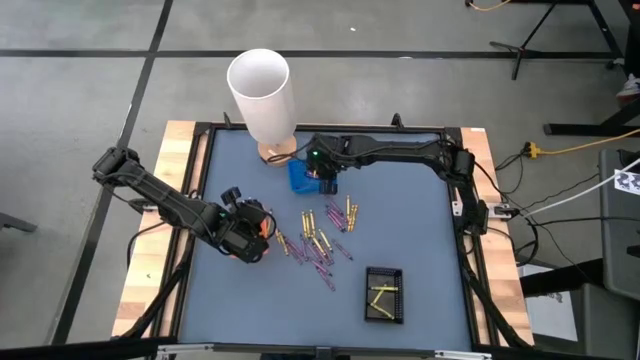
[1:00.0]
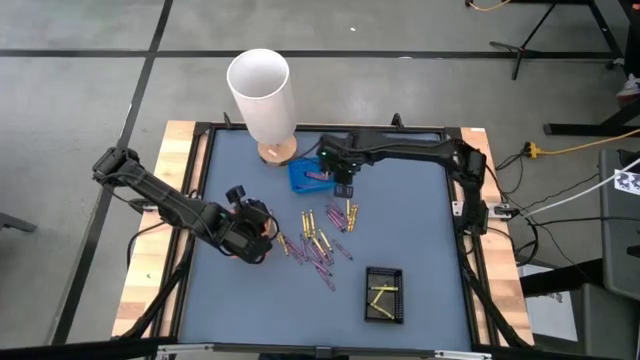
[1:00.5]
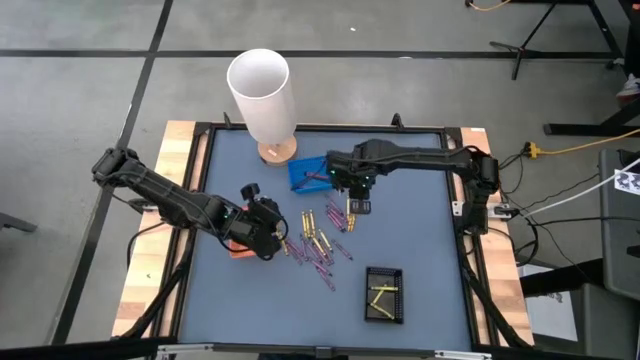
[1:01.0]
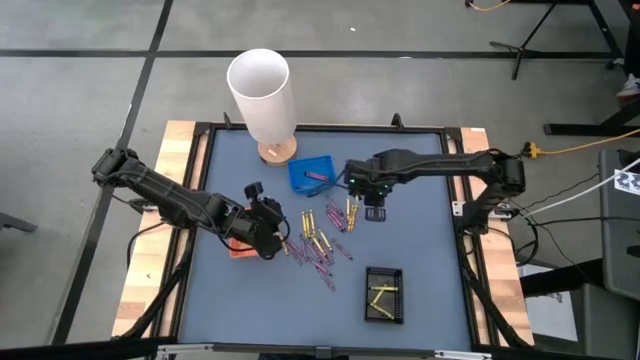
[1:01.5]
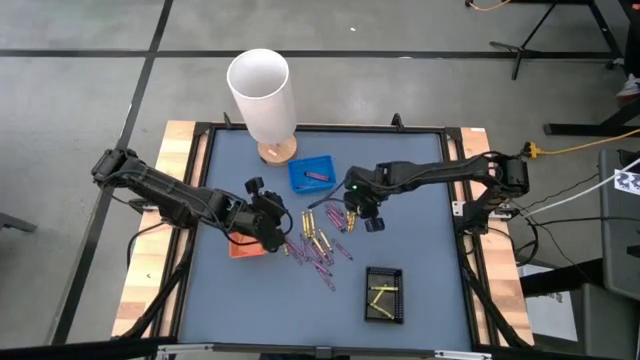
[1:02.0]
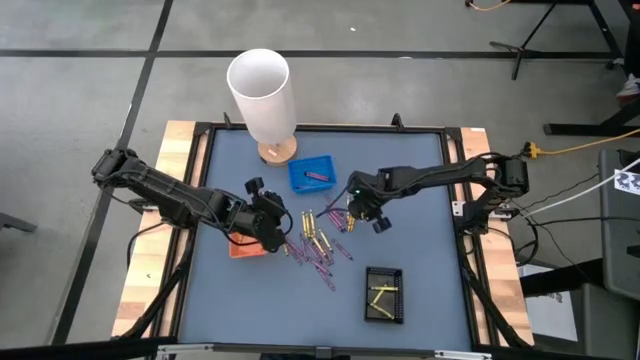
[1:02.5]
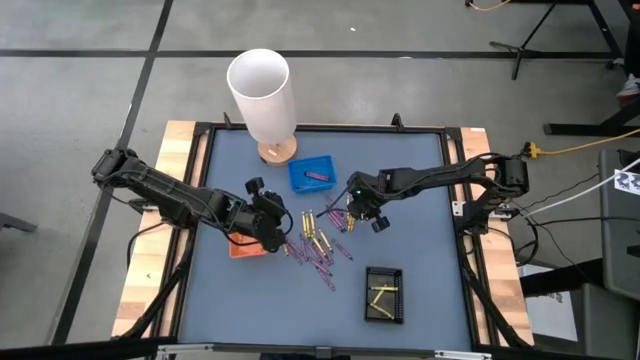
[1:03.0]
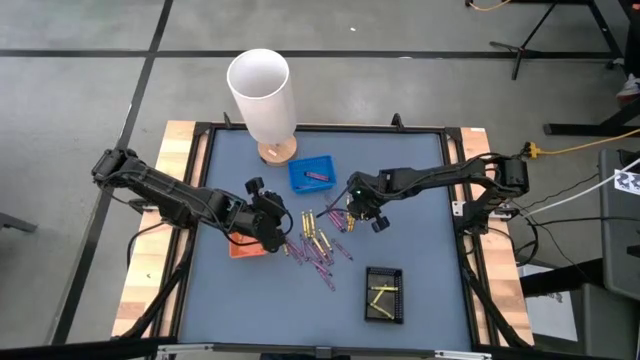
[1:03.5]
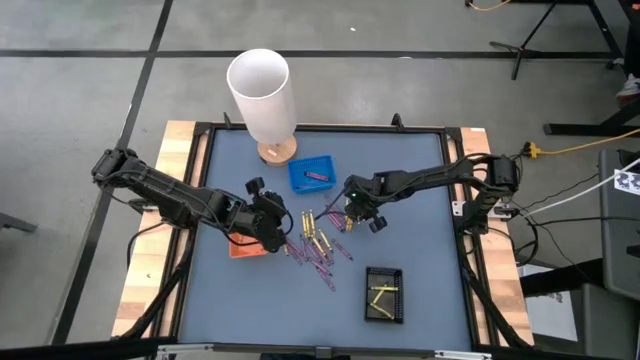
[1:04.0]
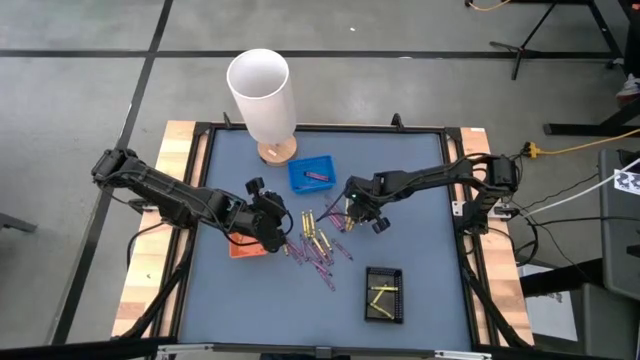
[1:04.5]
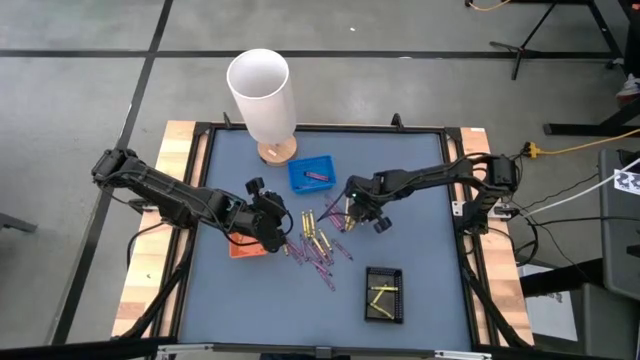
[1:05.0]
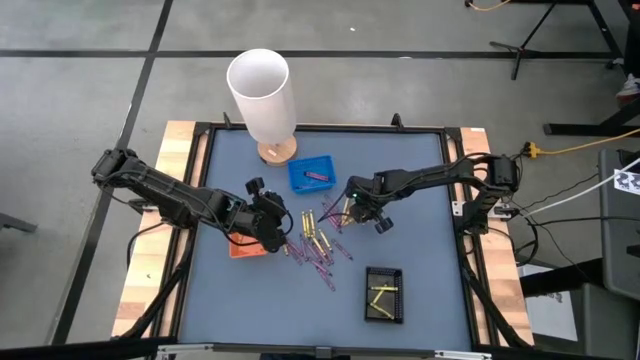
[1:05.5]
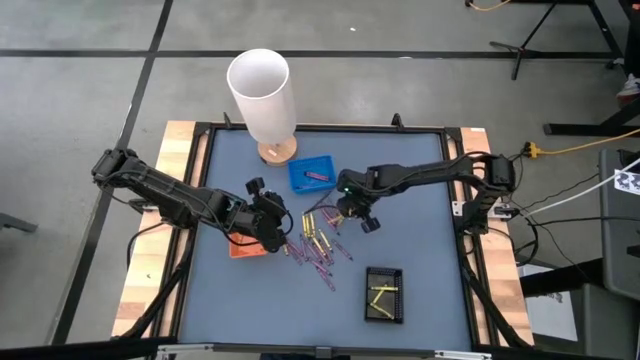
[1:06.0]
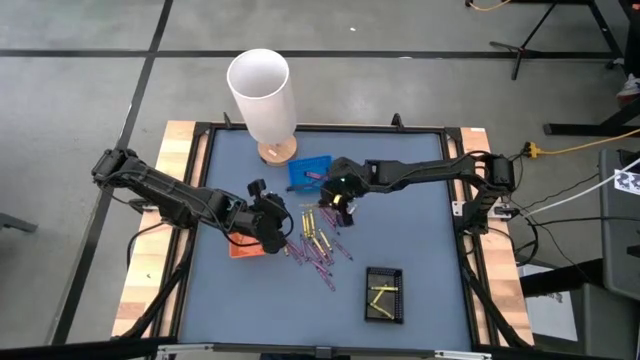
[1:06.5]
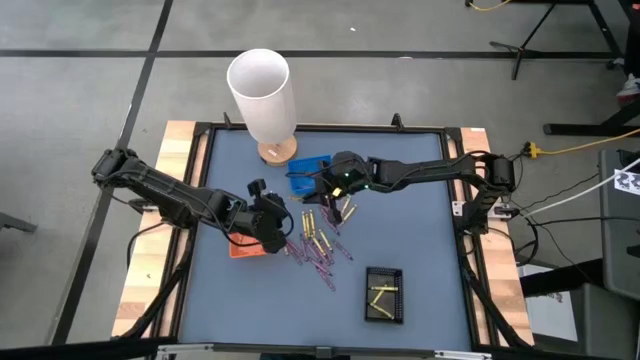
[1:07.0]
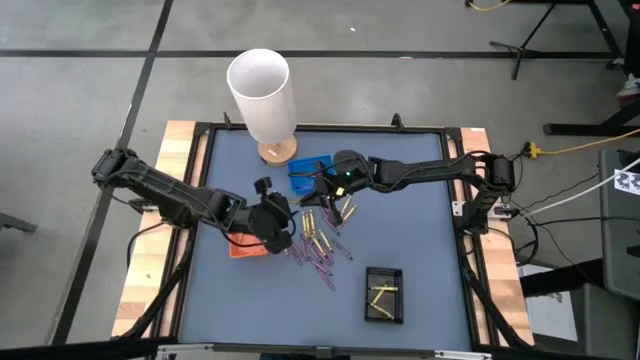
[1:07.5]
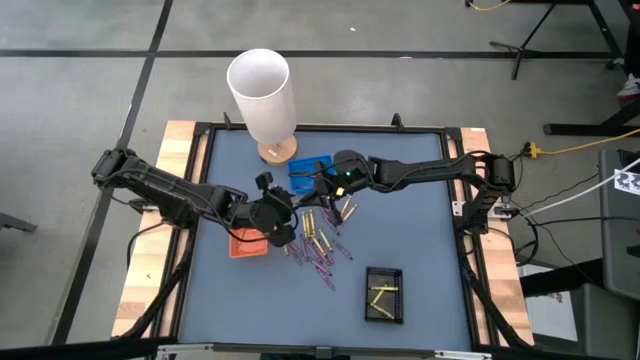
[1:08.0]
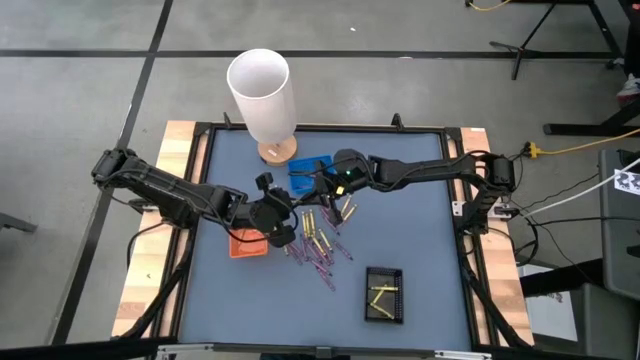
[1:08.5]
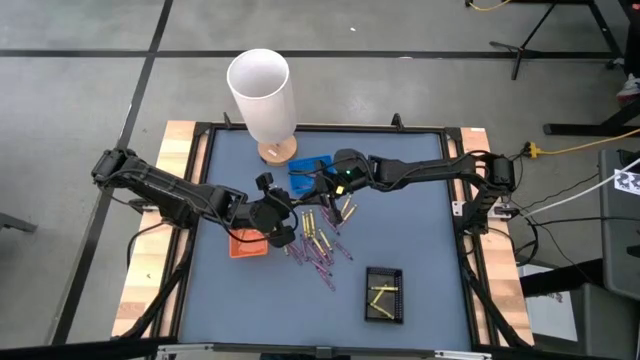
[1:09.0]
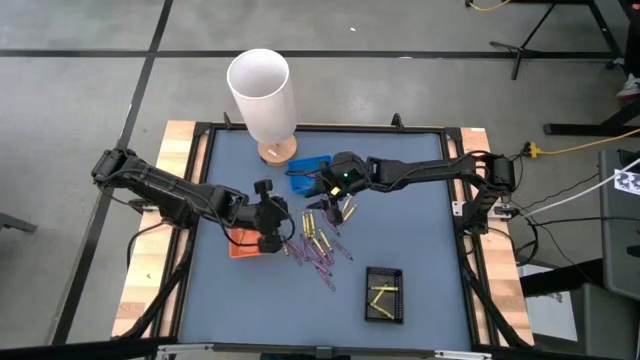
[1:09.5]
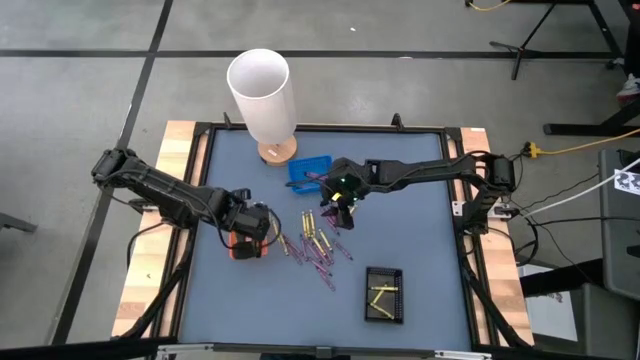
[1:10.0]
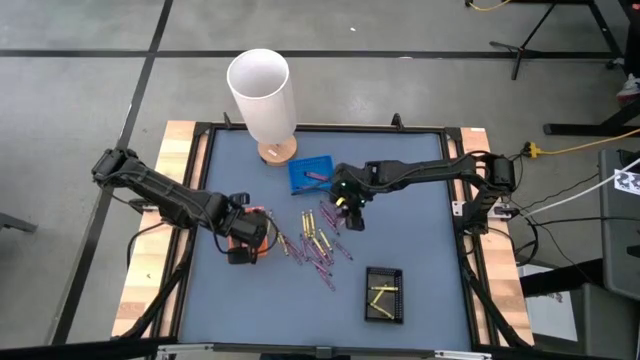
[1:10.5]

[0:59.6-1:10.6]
Task: Sort crayons
Put the yellow crayon into the orange bin

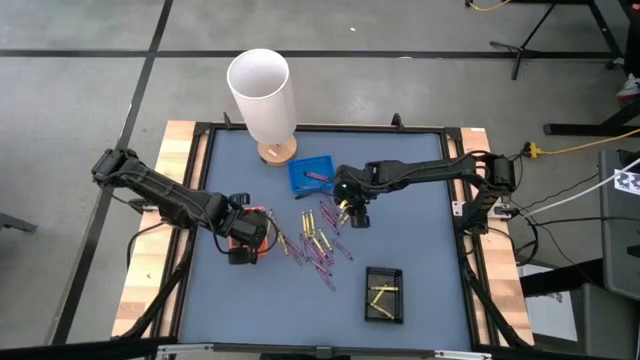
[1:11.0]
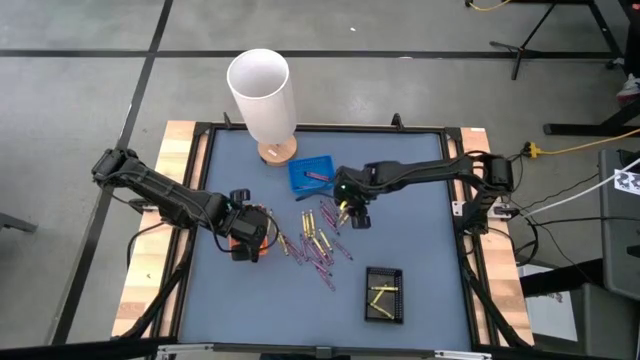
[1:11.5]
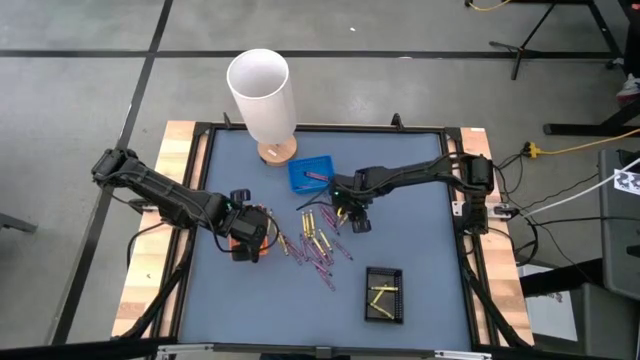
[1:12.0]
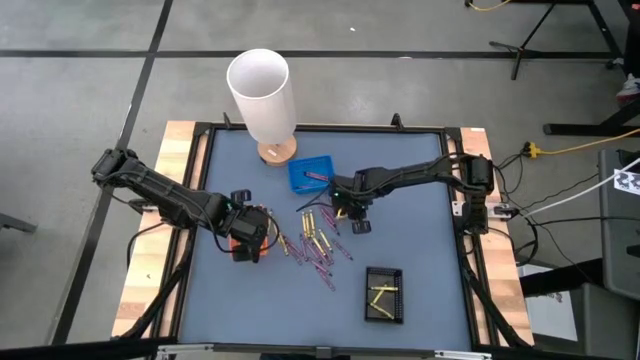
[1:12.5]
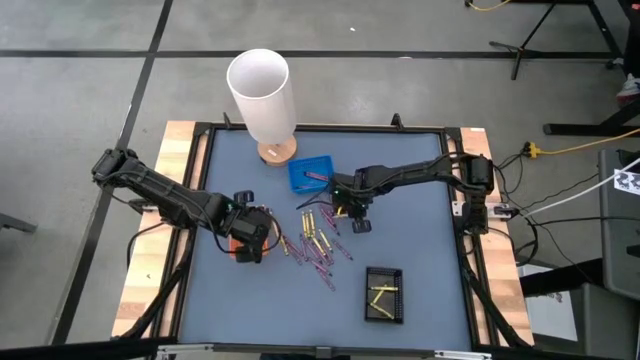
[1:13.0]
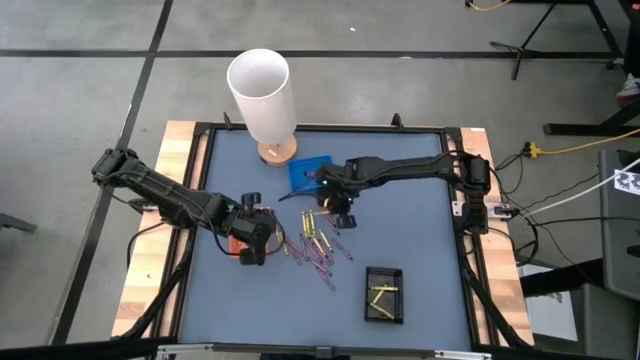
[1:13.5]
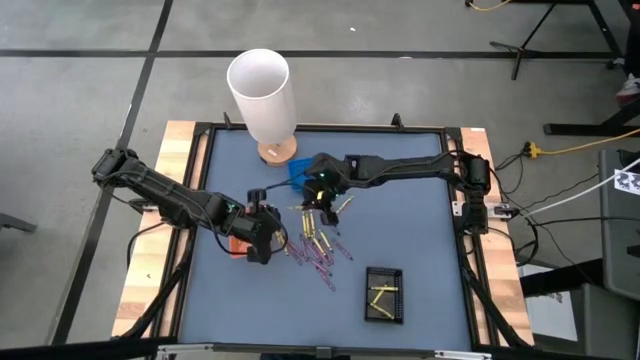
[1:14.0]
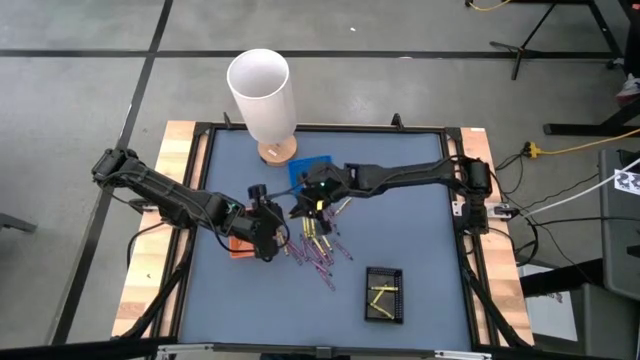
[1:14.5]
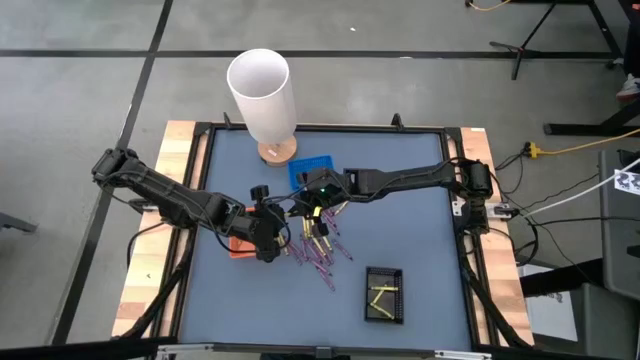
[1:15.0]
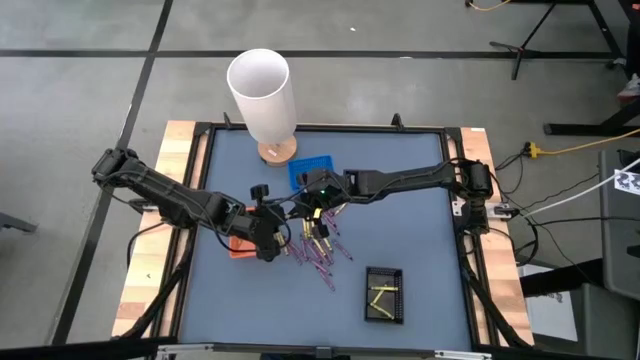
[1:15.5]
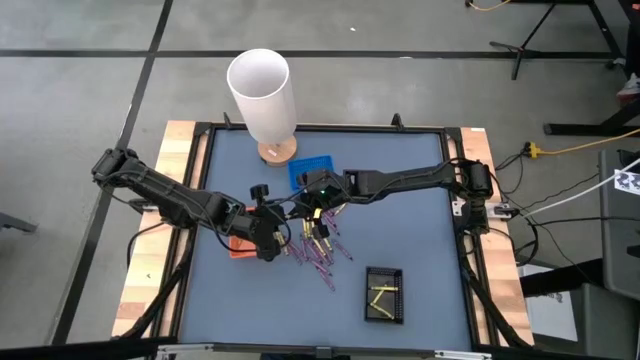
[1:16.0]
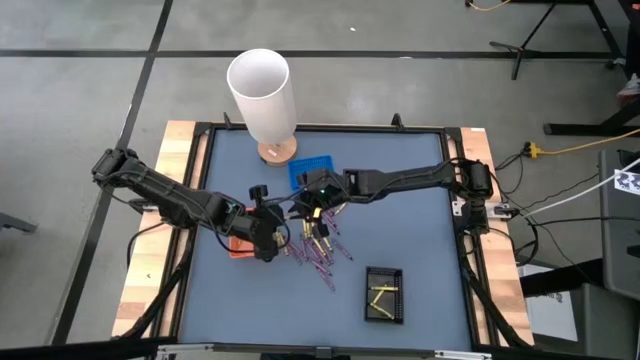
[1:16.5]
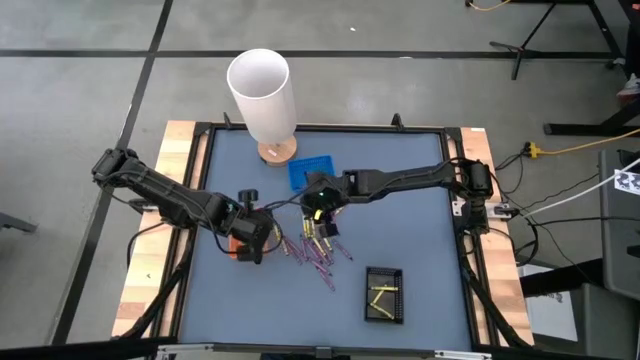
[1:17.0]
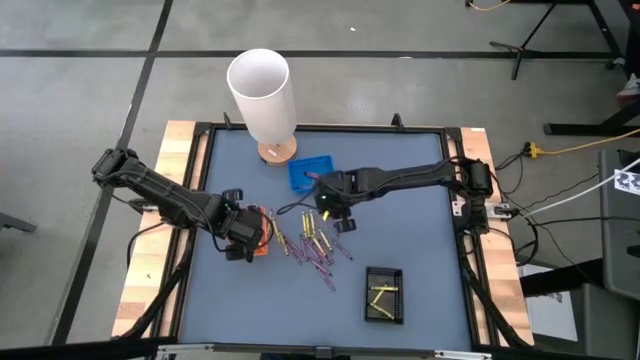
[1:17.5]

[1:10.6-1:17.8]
Put the yellow crayon into the orange bin

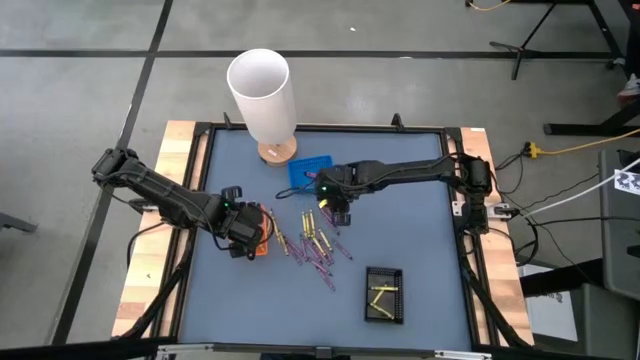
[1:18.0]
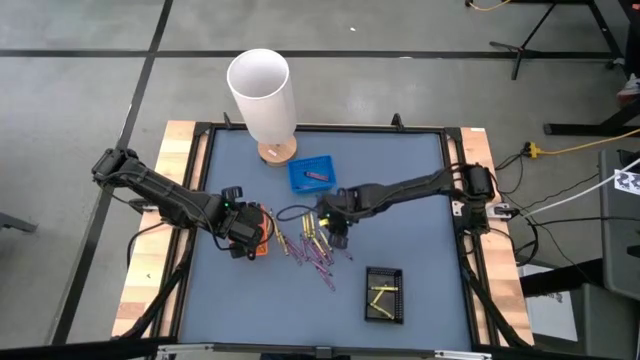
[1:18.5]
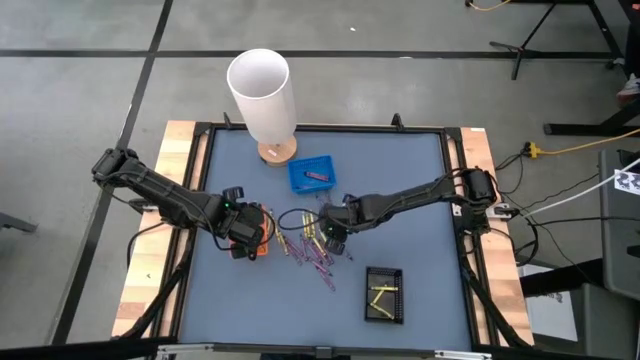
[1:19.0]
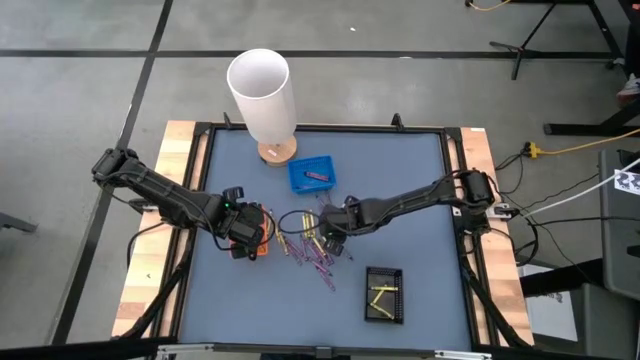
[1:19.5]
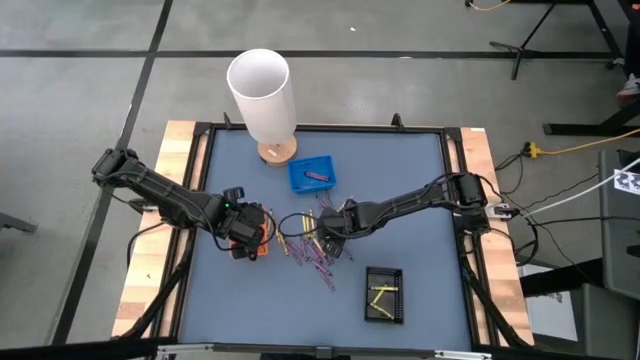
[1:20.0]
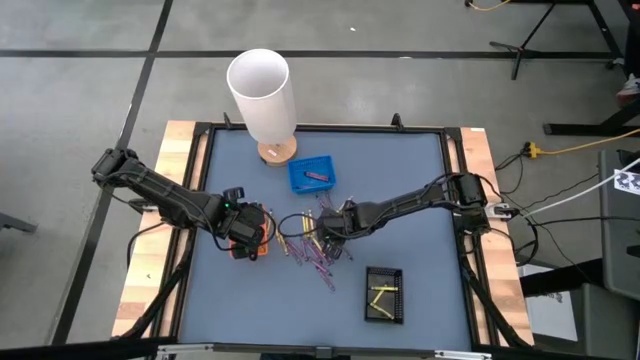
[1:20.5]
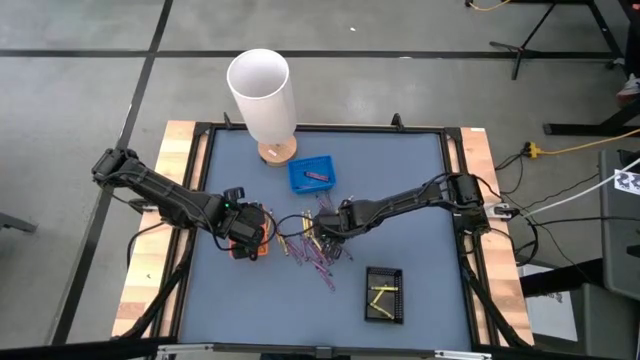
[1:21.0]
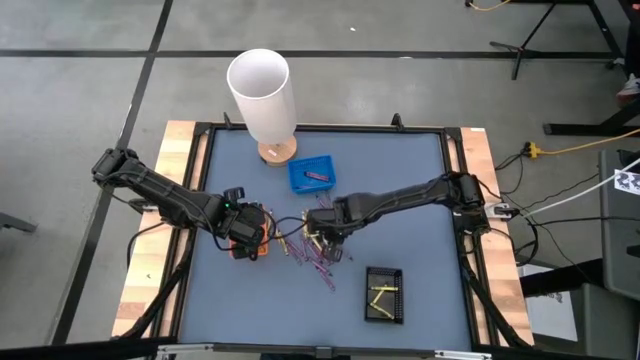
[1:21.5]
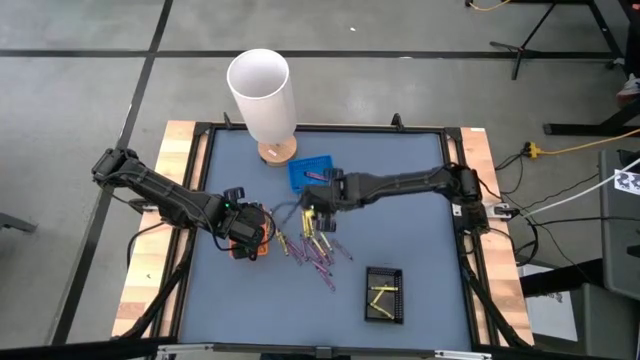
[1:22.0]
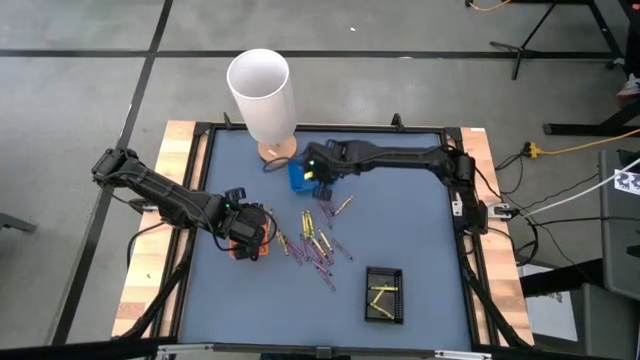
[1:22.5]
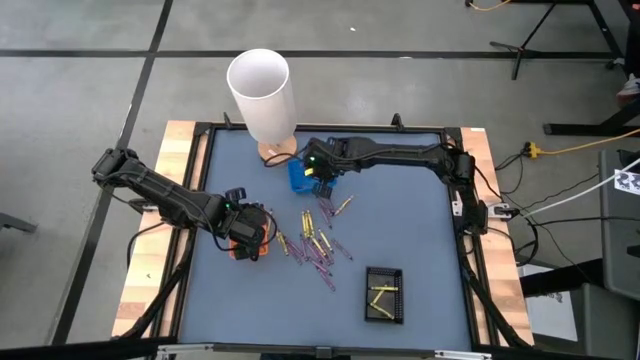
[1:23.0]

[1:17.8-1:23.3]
Put the violet crayon into the blue bin
